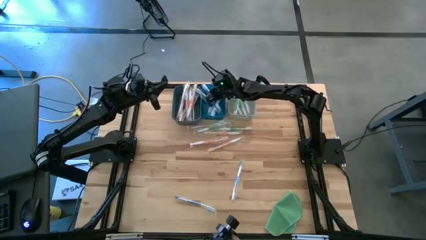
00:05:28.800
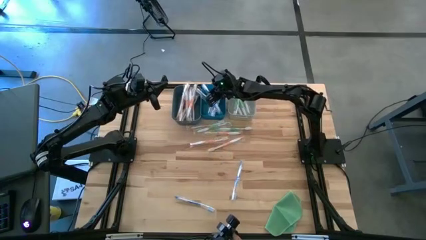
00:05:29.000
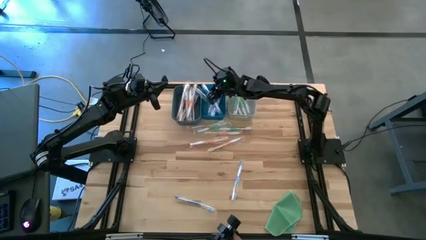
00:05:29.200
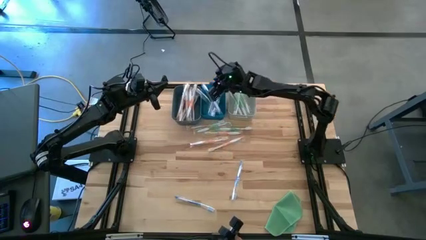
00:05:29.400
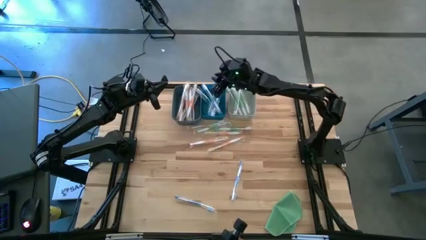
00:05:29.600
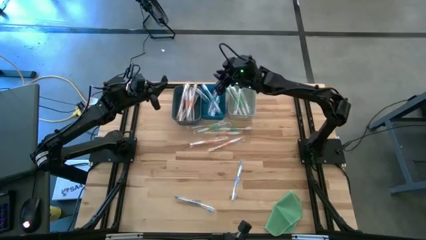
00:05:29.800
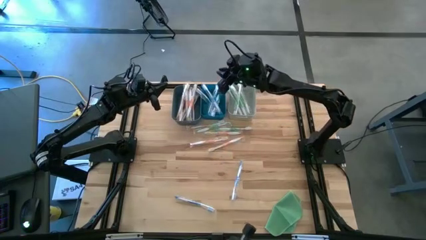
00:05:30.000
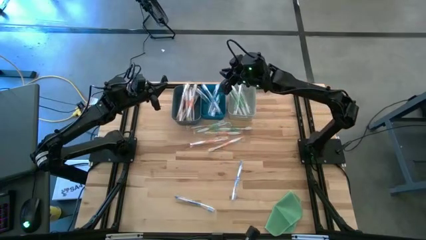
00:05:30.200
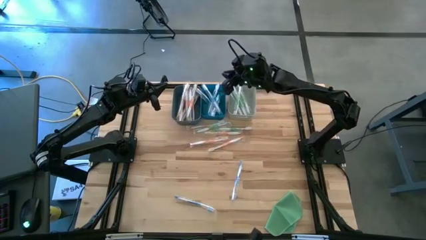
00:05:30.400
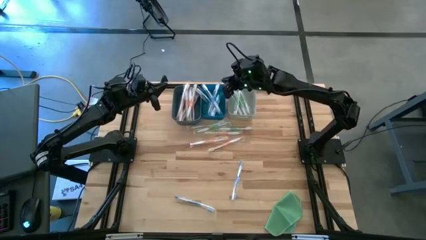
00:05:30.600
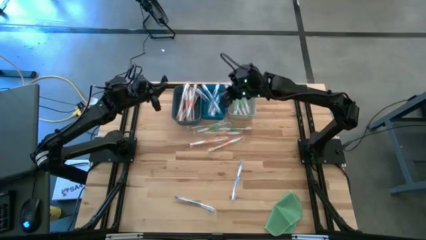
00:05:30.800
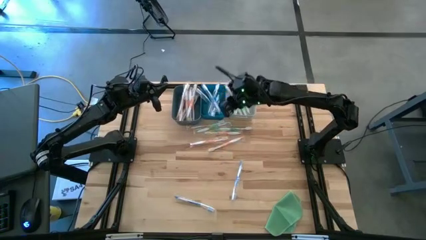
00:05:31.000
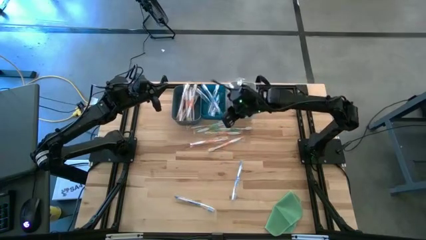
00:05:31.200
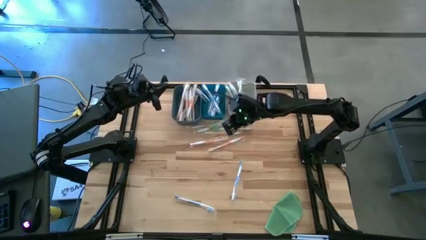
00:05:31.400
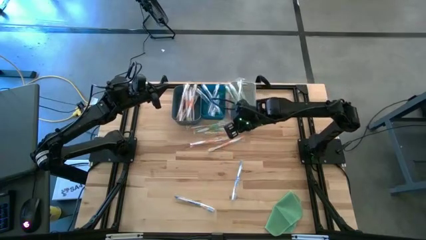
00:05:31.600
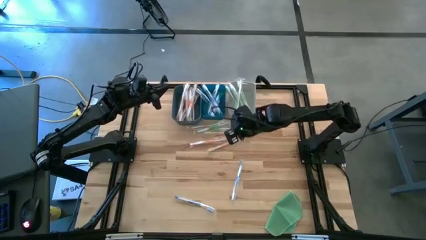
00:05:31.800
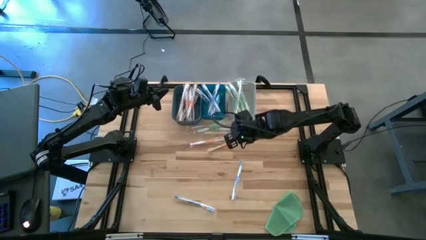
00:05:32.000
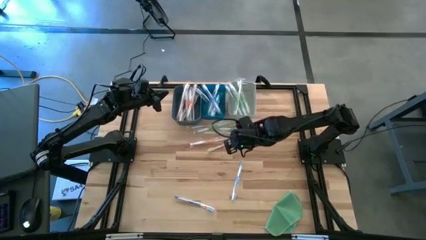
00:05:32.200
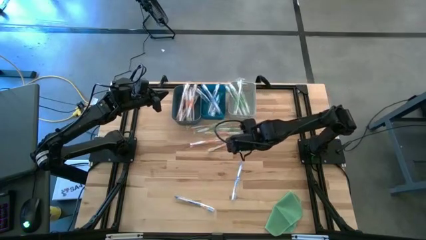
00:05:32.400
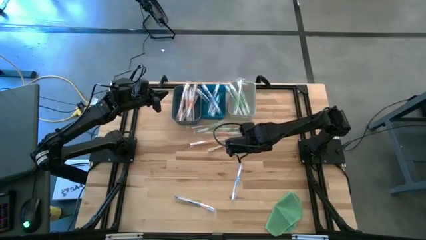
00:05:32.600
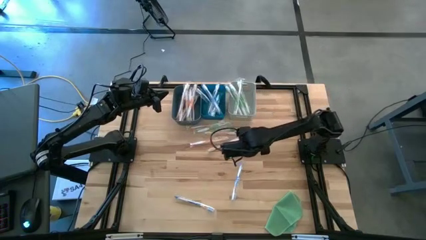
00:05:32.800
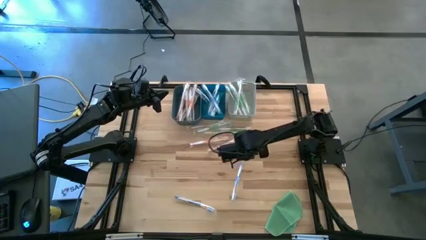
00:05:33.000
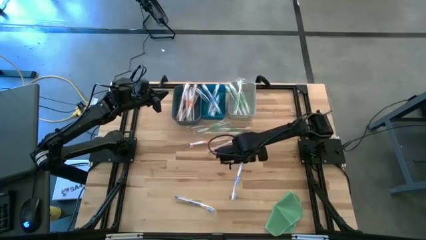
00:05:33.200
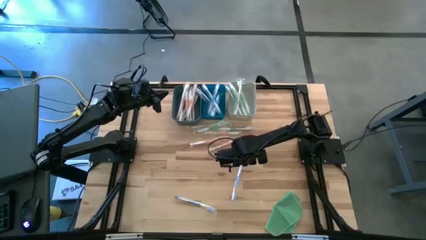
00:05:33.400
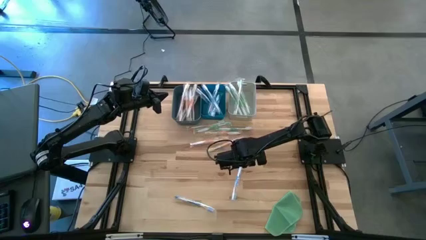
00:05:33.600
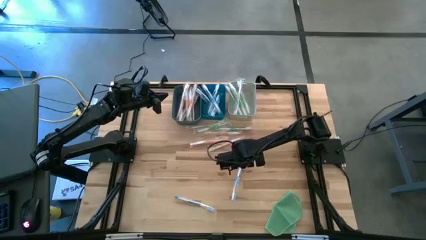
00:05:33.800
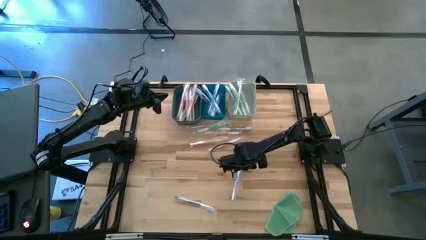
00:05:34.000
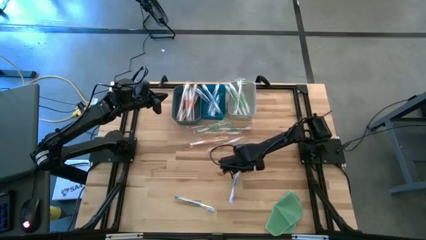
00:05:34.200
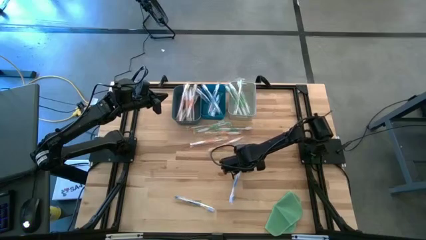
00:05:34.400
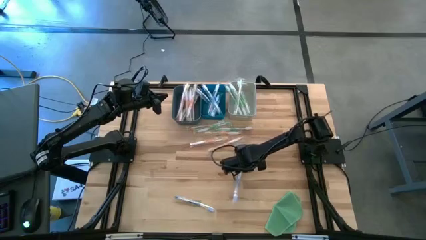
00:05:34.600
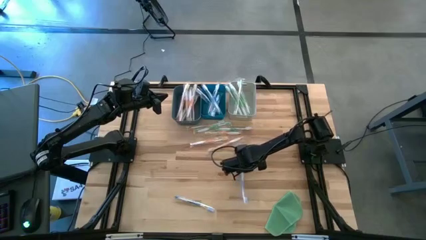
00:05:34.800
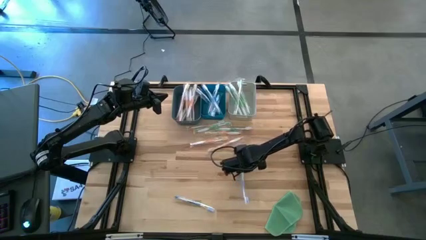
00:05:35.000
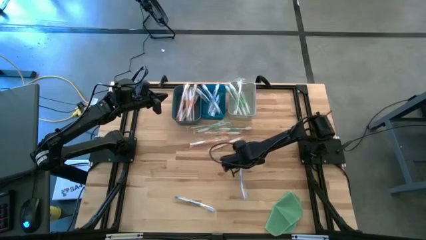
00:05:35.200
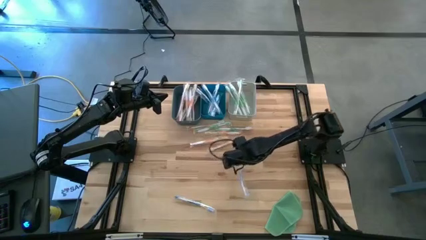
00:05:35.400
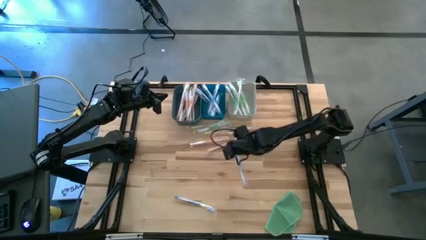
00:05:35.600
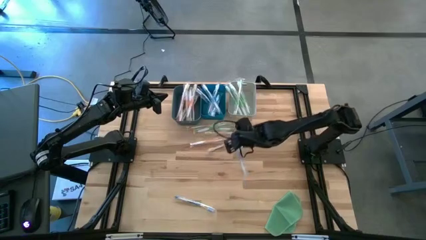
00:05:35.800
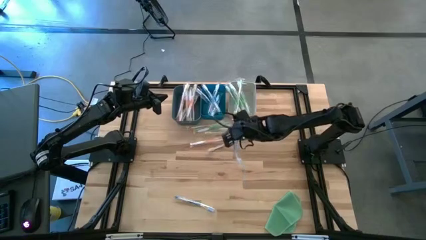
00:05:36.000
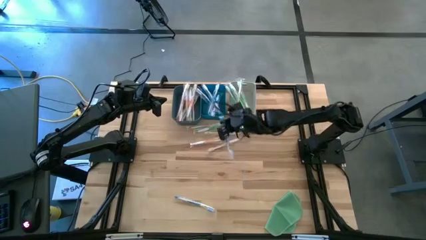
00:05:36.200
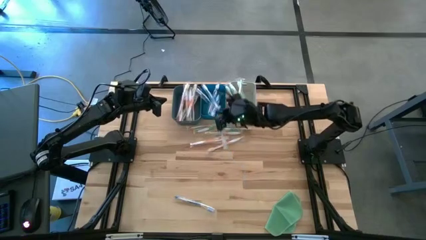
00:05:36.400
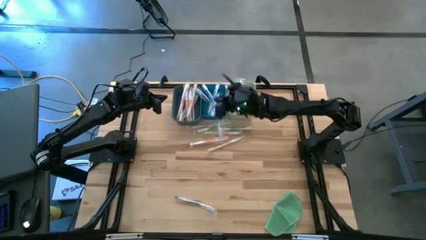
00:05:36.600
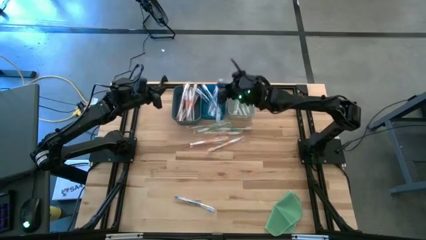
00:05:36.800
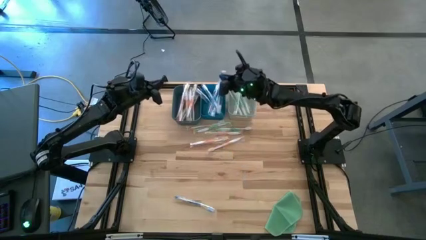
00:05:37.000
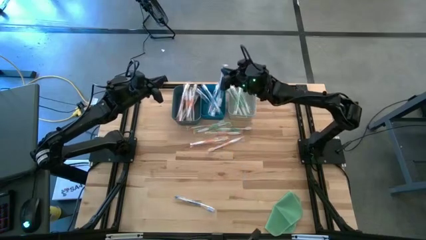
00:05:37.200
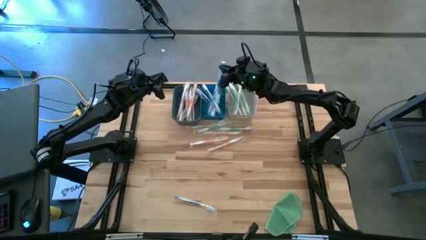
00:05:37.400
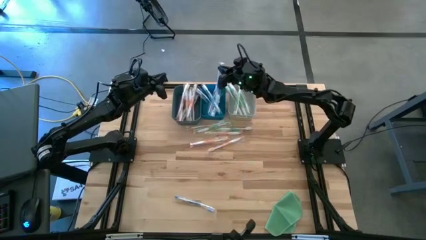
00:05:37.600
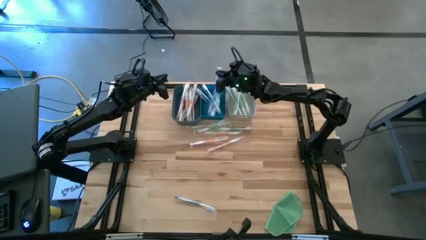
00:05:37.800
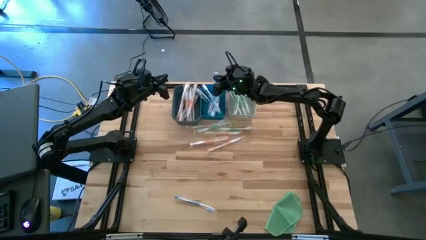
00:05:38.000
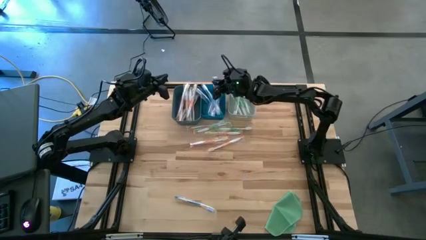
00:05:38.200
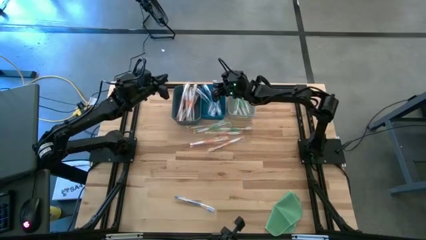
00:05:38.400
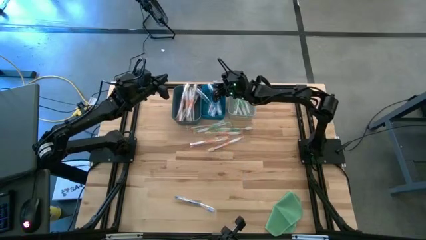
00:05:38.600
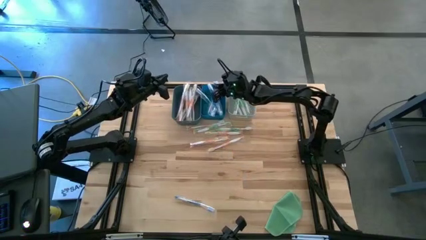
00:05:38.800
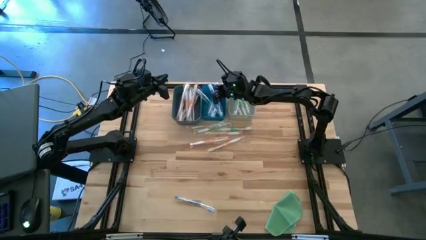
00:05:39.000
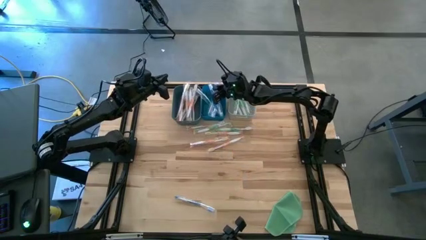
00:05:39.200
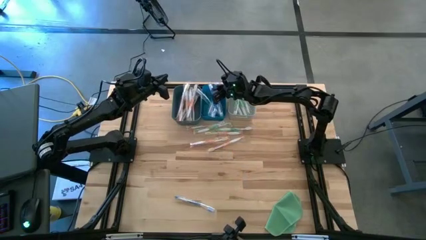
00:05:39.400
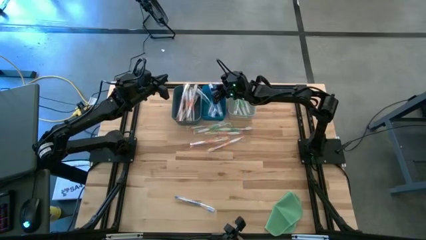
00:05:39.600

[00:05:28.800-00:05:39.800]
Task: Pick & Place Toothbrushes
Put the blue toothbrush into the blue bin

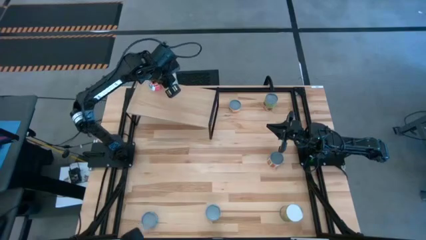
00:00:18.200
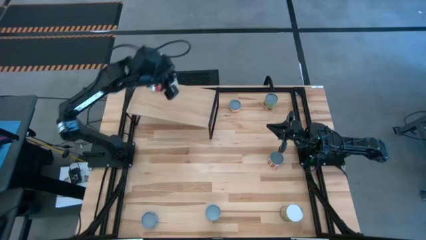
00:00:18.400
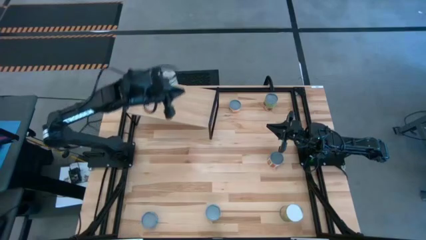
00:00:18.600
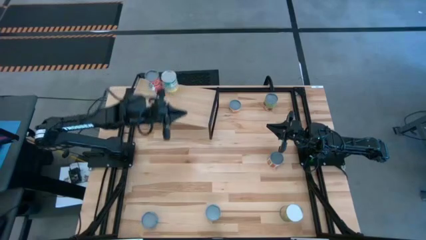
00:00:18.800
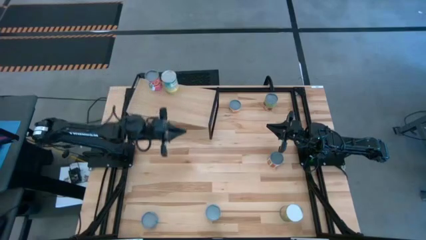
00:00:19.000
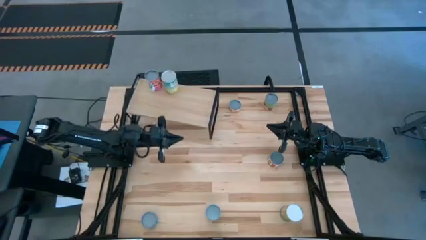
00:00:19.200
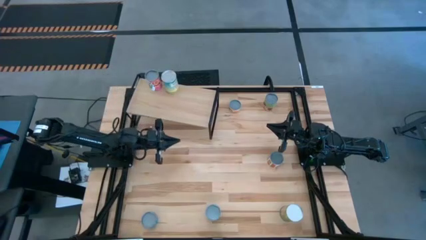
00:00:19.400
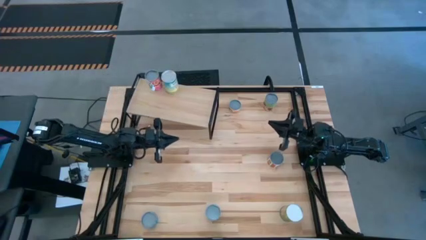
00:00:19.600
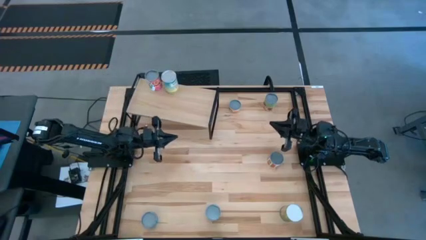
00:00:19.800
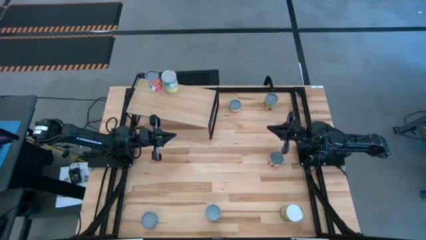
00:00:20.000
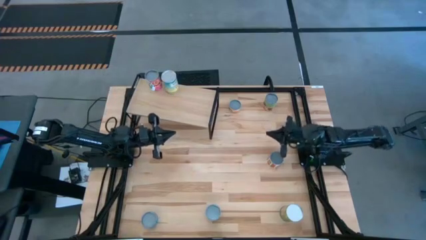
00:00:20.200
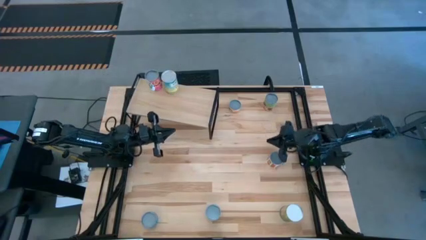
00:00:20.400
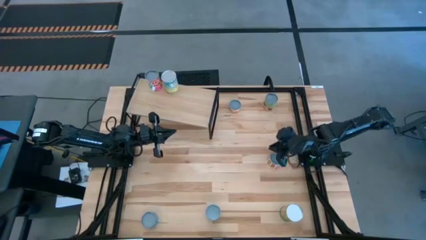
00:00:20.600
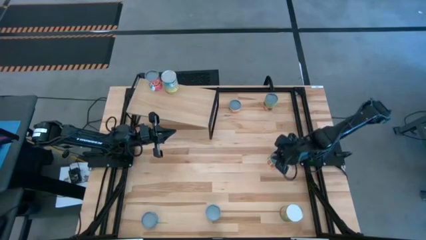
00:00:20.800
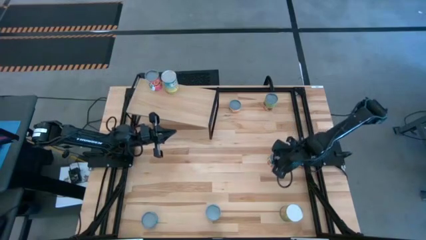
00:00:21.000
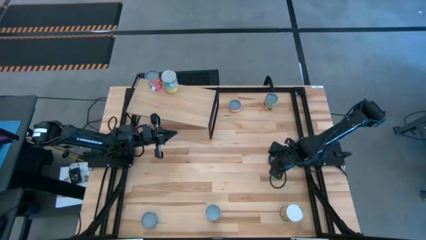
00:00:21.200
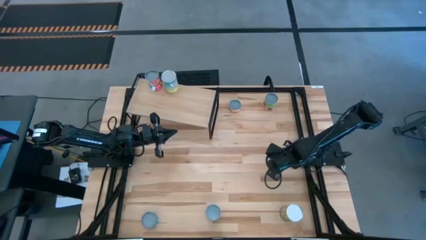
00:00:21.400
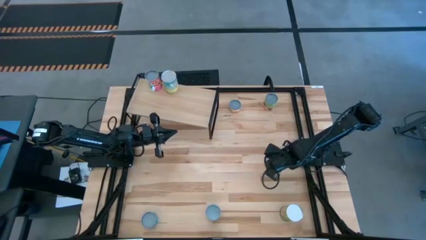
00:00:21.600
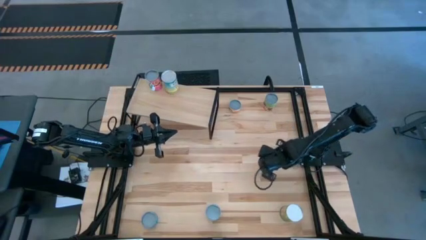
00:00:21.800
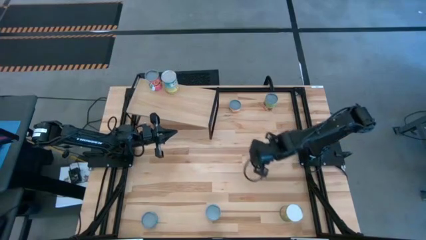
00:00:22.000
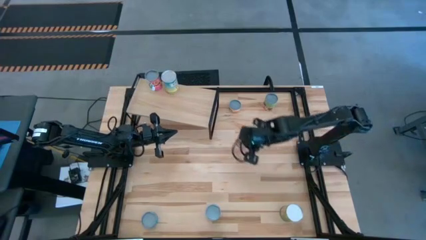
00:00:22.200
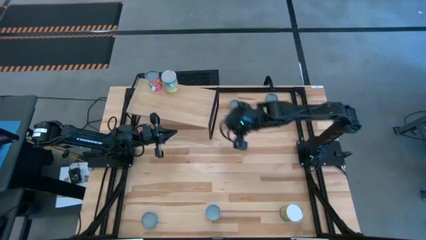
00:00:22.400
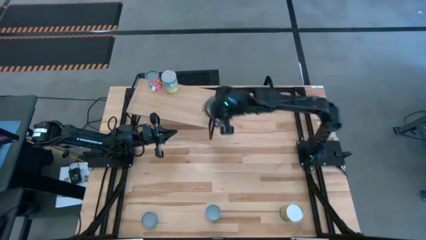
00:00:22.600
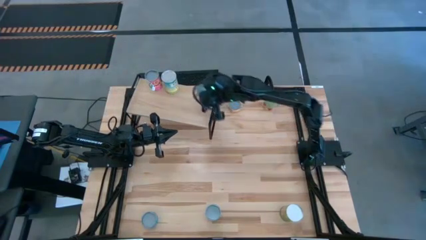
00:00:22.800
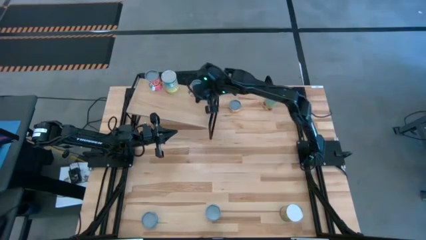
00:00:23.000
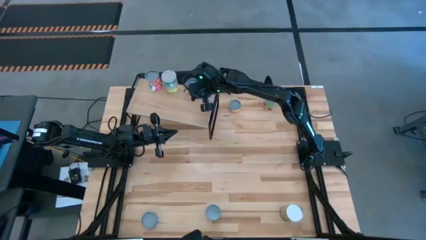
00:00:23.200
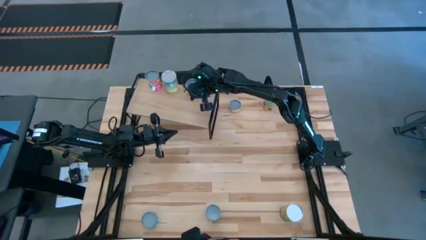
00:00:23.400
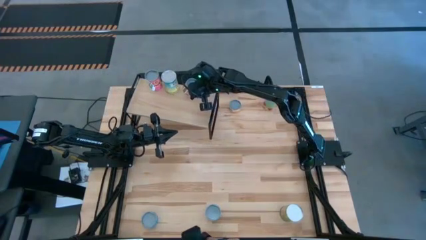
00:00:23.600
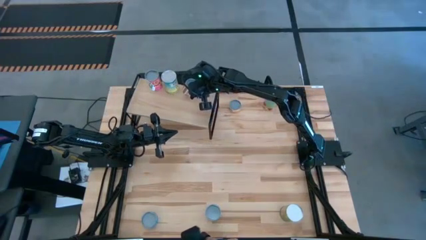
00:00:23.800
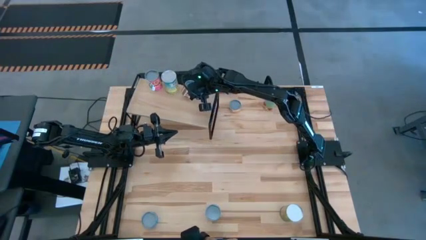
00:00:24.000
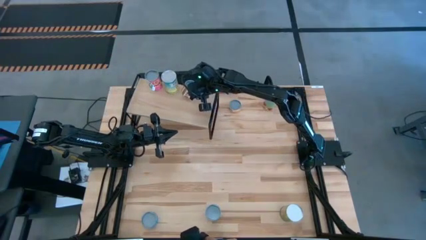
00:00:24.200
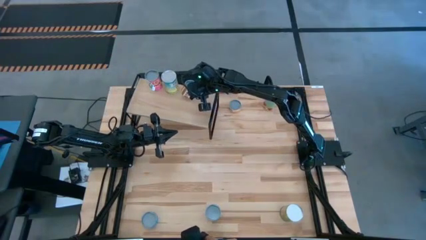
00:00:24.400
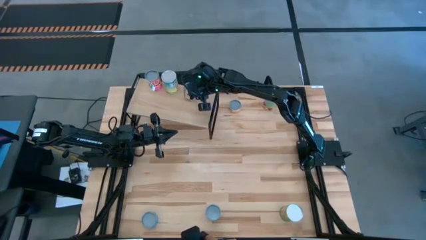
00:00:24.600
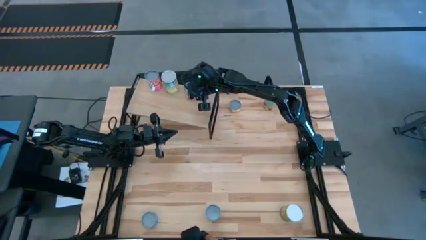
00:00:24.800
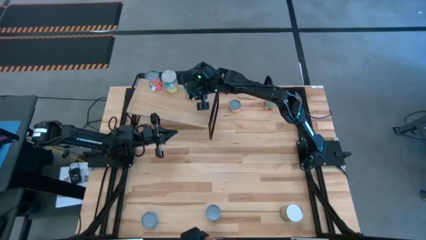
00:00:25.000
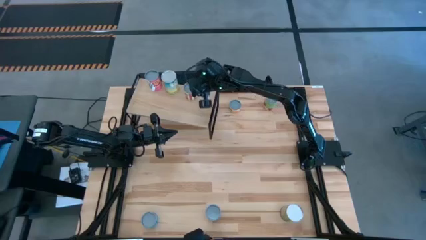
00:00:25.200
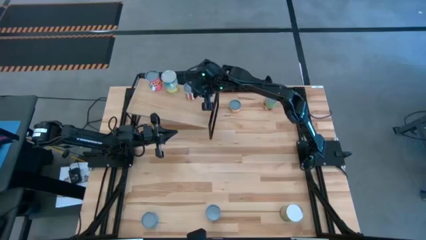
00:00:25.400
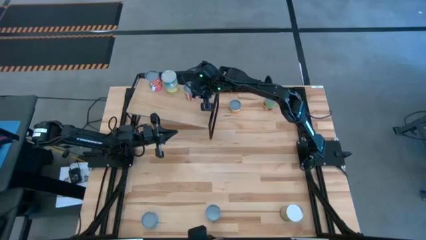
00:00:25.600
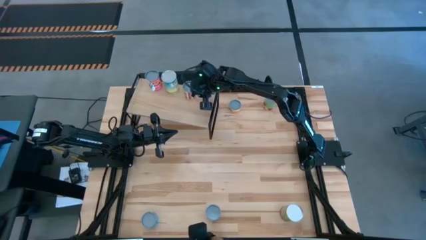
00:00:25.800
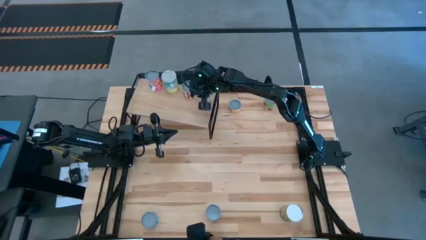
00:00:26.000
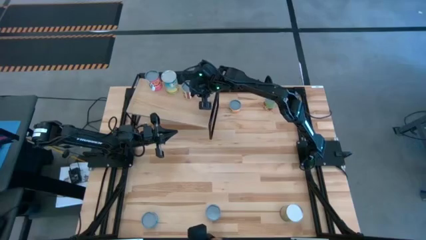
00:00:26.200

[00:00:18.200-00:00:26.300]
Task: Pick and place cans onto a shelf
Put the canned diced tomato on the shelf
